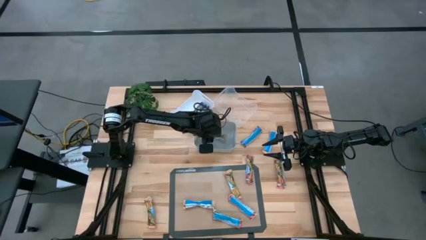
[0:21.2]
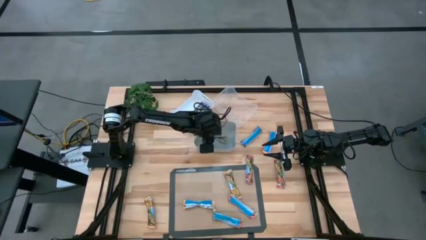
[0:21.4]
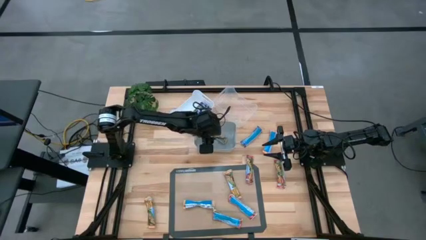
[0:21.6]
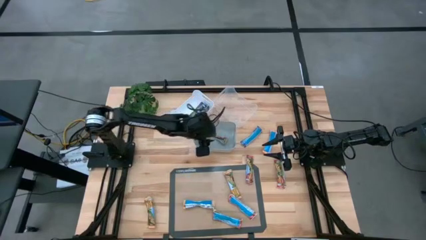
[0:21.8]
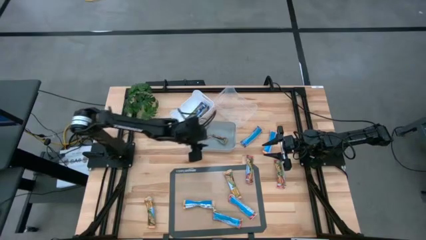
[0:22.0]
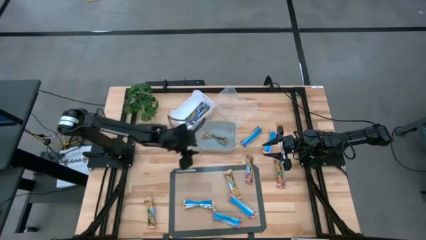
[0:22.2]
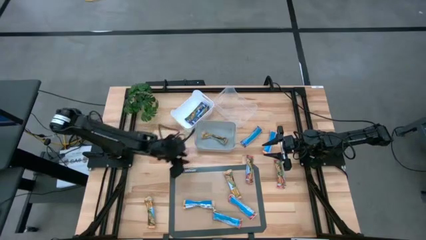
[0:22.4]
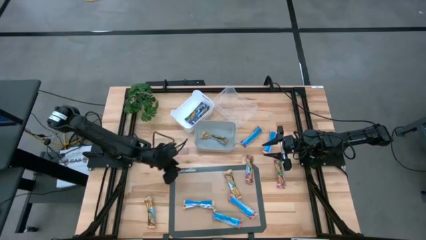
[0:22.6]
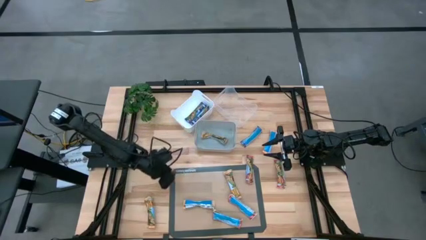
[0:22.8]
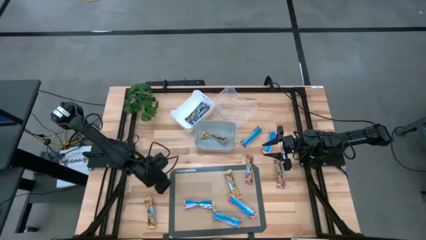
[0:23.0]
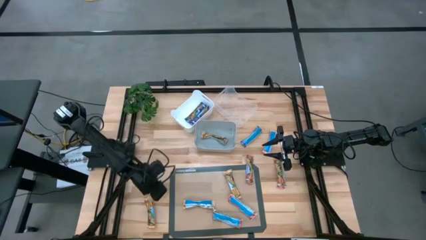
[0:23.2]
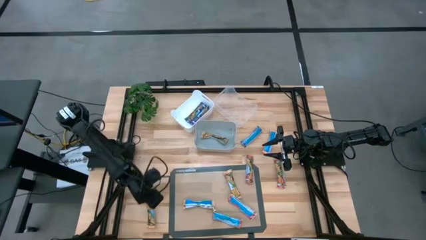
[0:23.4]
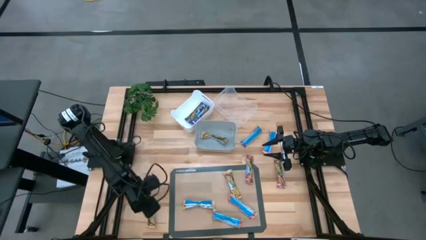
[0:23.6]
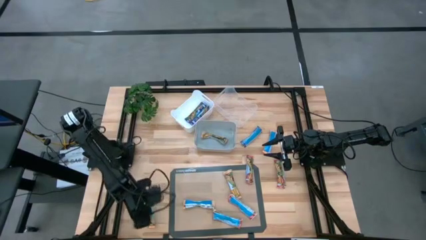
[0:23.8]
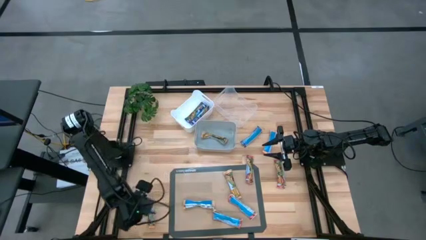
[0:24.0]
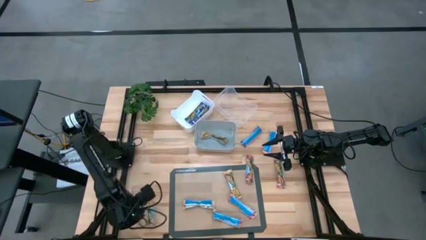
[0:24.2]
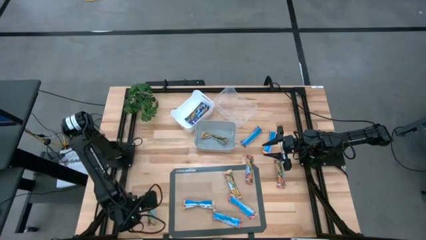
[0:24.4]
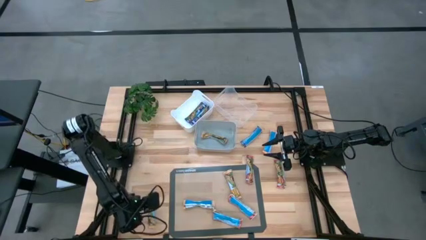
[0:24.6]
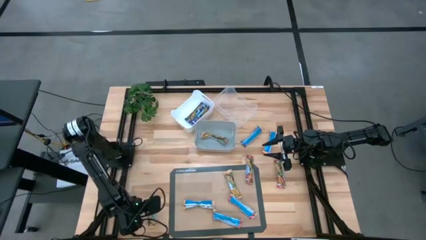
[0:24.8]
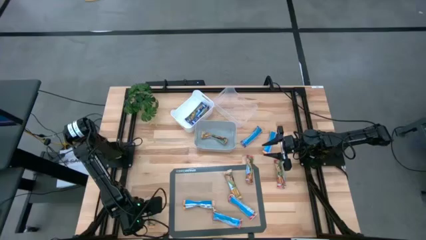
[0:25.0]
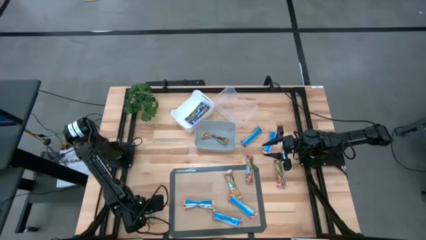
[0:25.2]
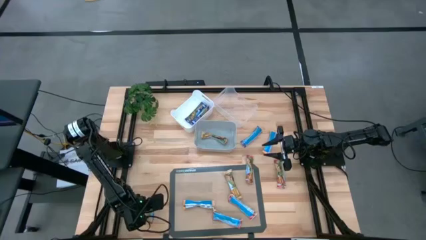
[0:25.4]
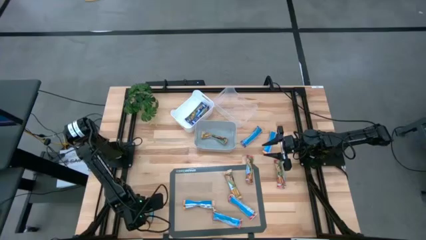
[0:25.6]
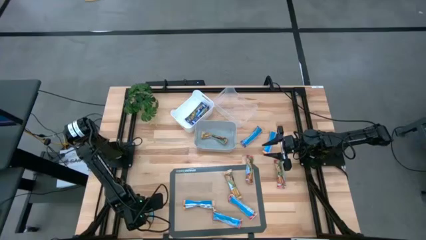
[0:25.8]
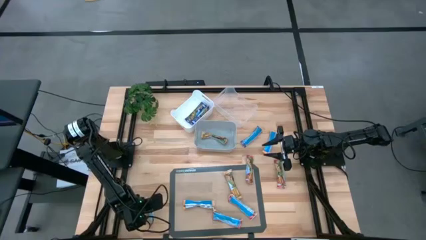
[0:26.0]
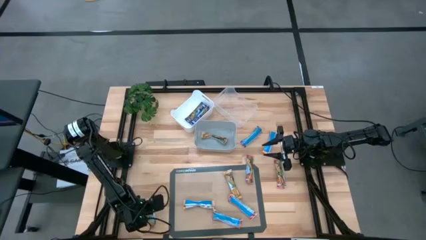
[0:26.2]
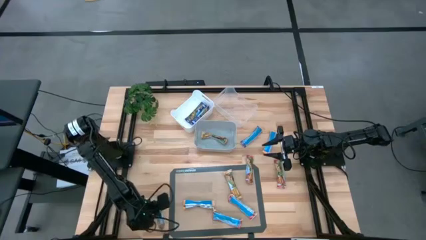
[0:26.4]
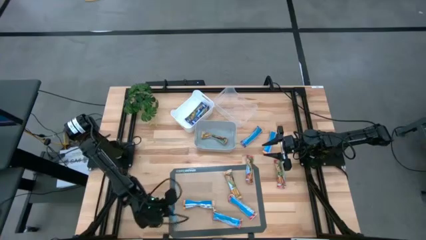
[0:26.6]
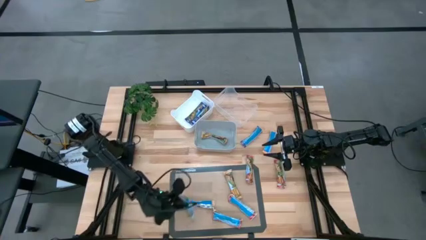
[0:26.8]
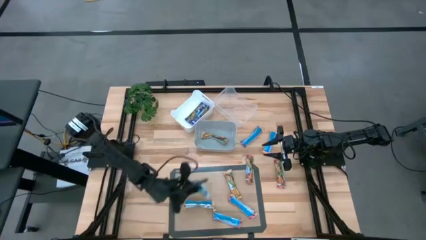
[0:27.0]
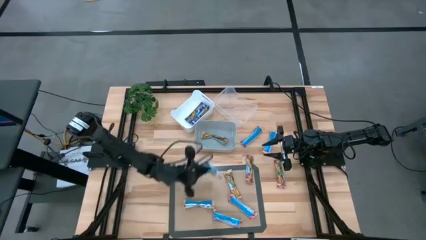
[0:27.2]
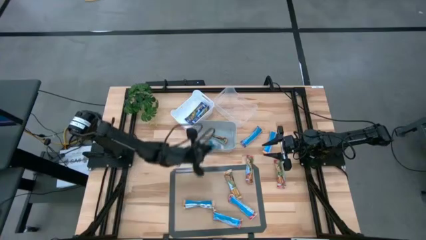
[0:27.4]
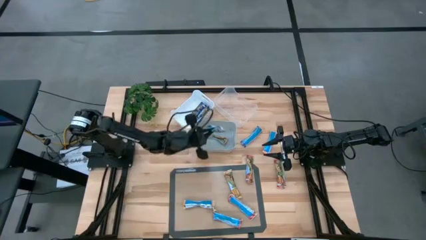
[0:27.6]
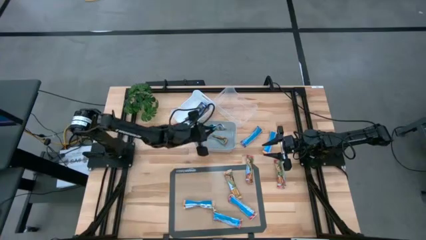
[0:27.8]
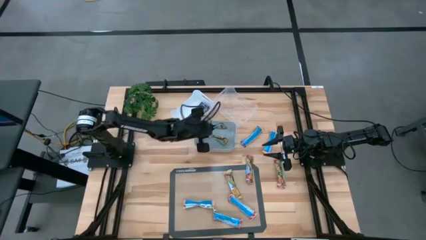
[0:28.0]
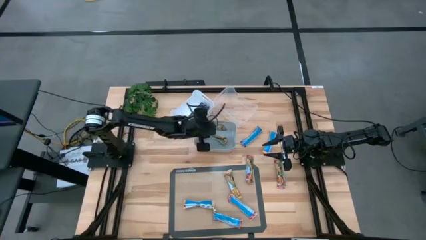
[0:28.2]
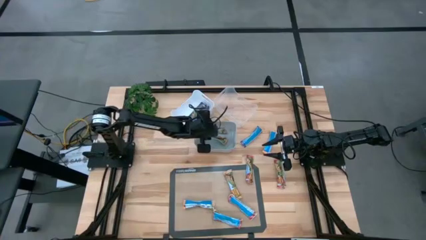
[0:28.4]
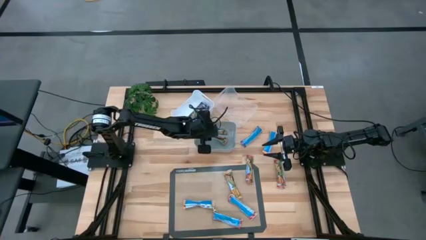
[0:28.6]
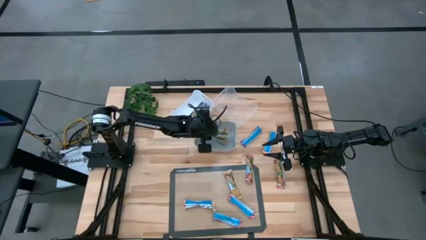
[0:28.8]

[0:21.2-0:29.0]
Task: Pick and place Granola Bars by type
Put the yellow granola bar into the gray bin

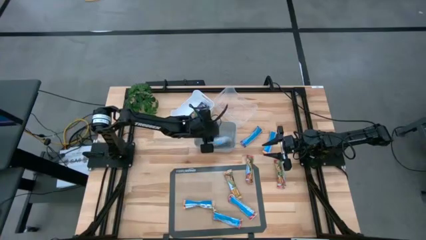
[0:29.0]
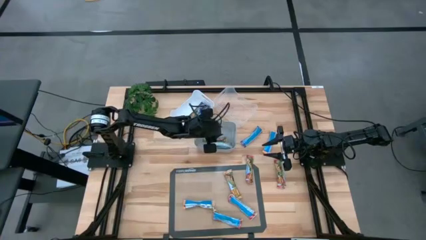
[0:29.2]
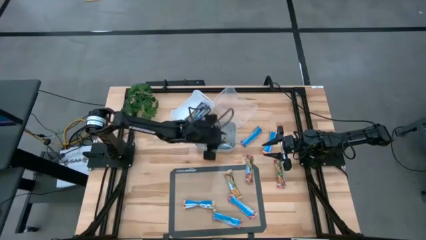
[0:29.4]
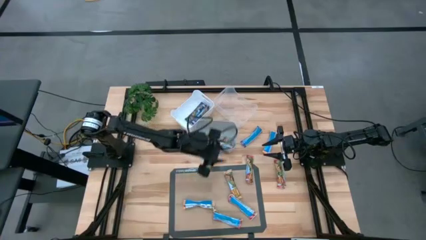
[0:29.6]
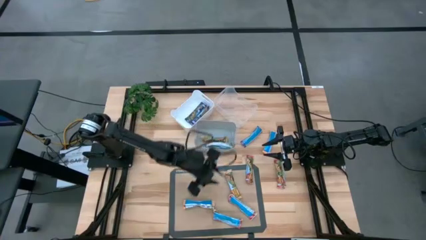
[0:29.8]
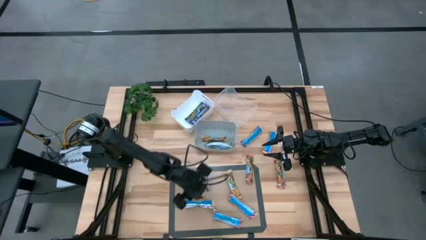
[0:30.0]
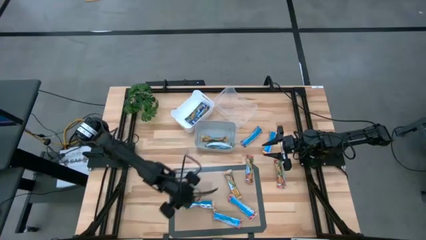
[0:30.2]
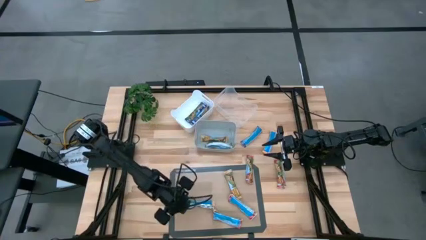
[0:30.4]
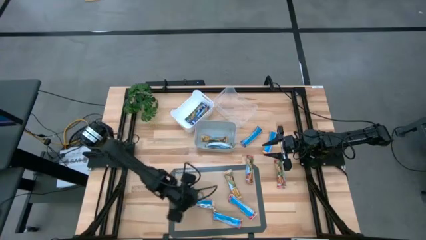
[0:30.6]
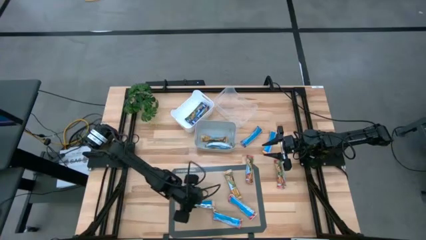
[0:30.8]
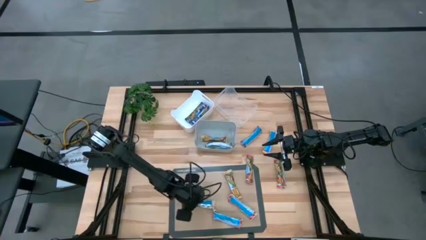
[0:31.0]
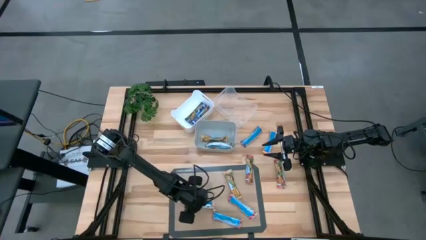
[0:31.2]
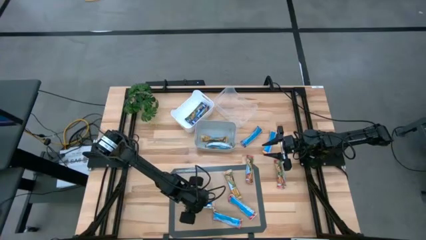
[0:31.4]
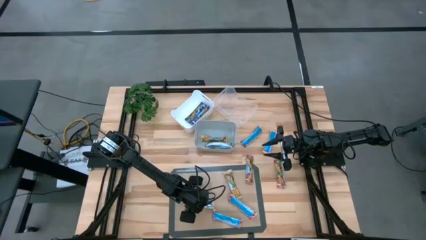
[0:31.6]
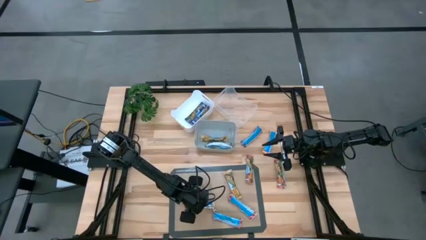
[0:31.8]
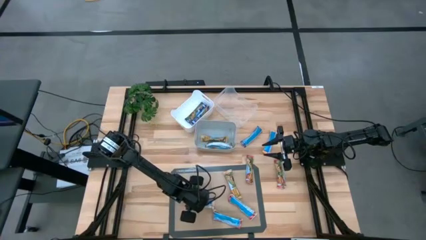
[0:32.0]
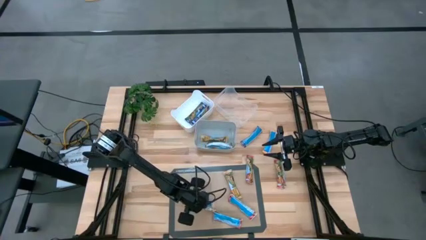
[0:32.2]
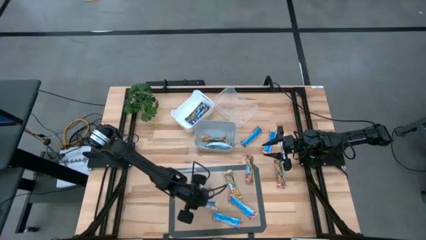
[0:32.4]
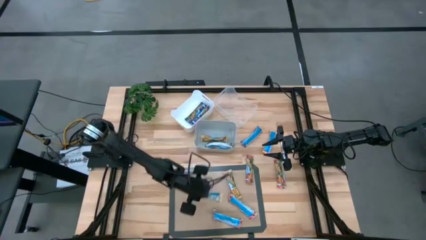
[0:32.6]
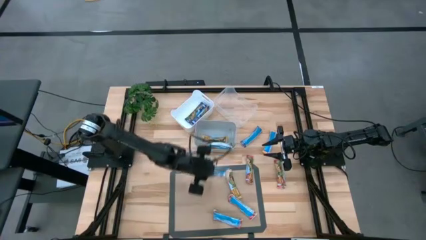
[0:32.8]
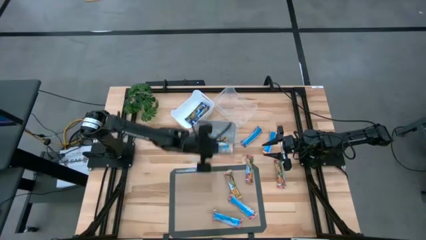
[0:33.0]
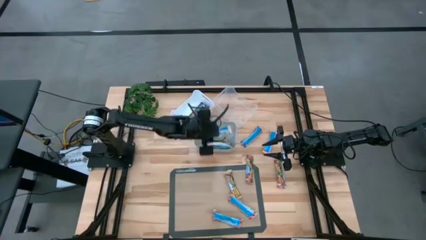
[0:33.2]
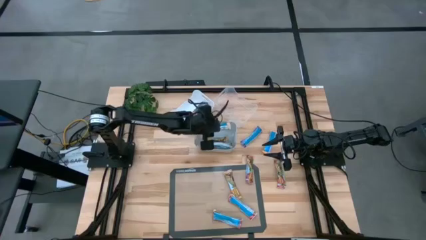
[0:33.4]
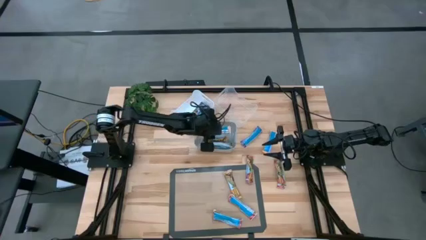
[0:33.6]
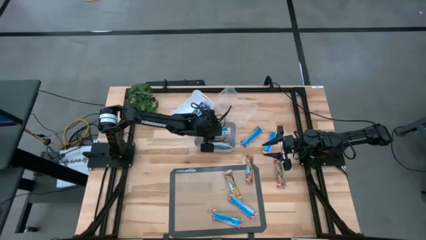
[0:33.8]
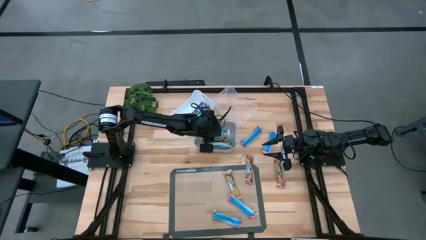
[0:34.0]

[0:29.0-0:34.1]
Put the yellow granola bar into the gray bin

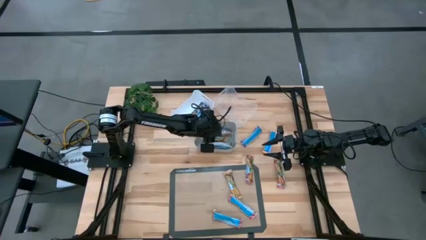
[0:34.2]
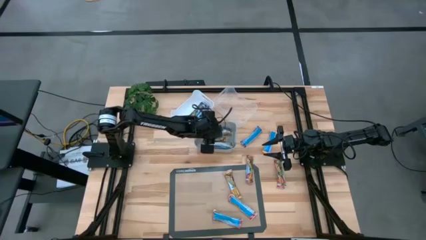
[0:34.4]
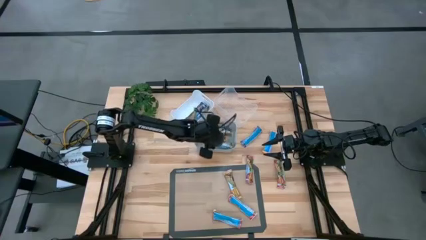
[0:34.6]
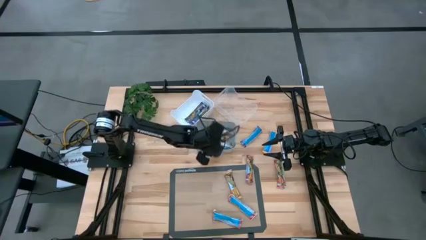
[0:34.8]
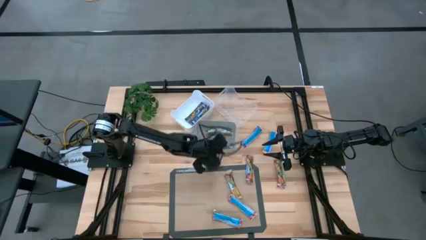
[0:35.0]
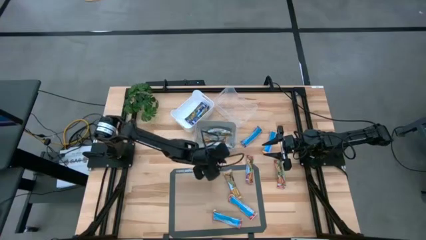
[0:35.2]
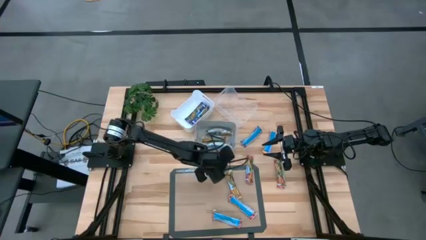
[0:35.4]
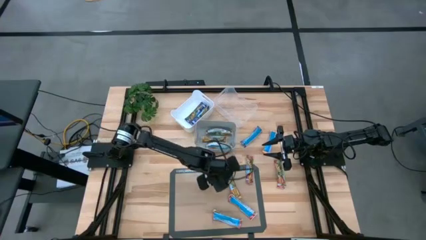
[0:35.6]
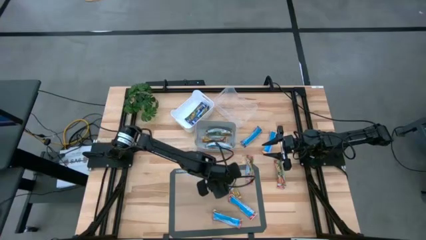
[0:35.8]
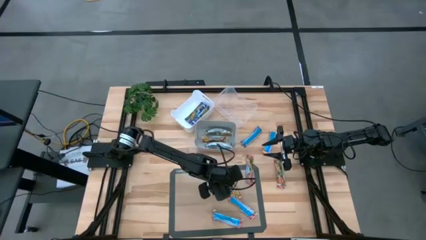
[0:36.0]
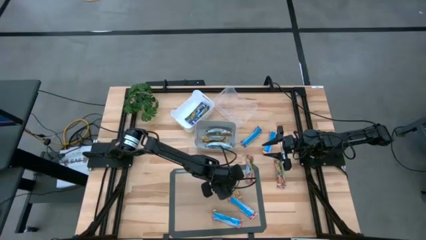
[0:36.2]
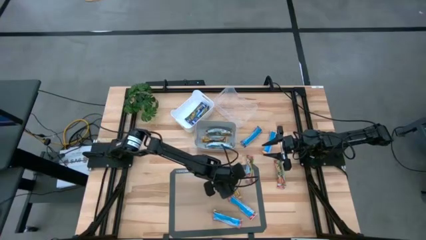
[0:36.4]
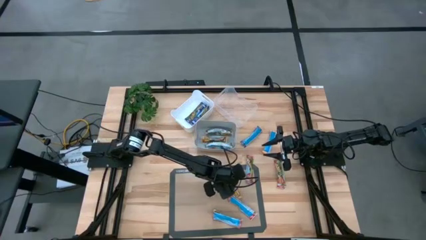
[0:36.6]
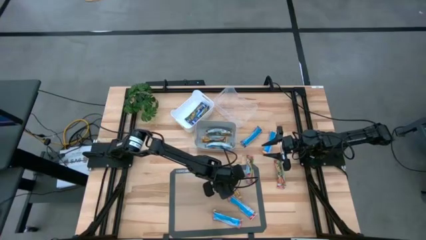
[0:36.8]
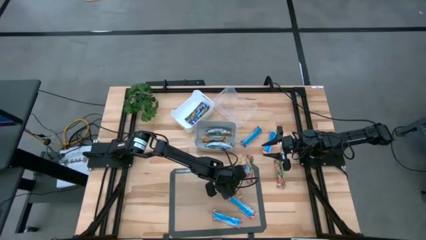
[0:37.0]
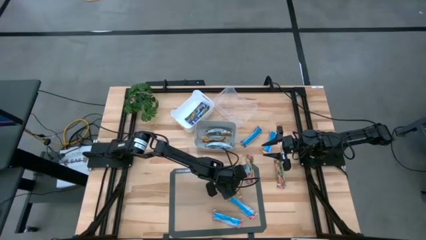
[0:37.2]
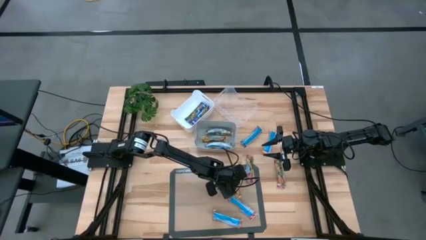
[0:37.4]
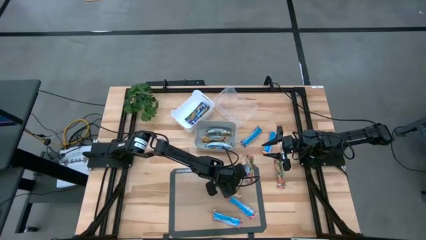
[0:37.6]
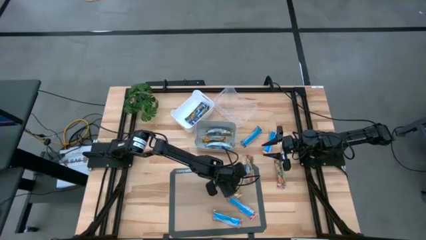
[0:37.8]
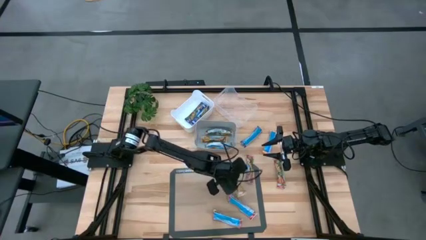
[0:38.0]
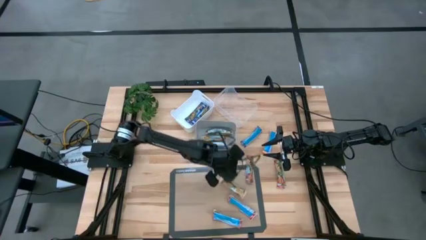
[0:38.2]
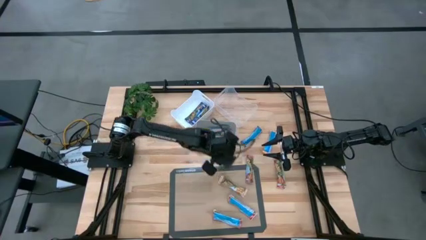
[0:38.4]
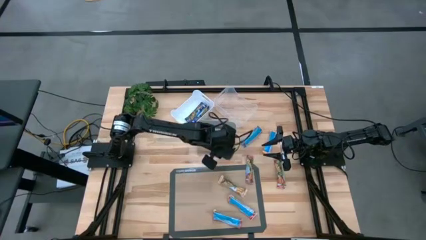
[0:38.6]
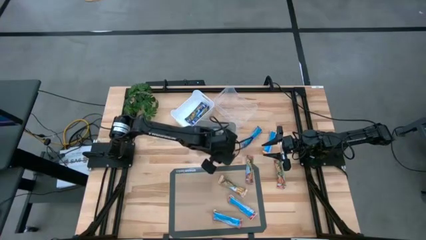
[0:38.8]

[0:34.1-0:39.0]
Put the yellow granola bar into the gray bin
